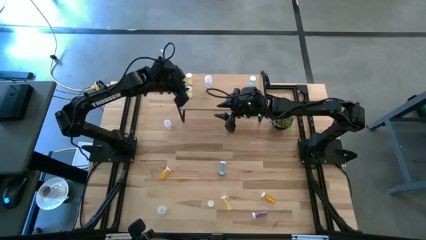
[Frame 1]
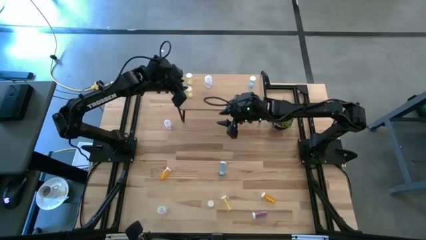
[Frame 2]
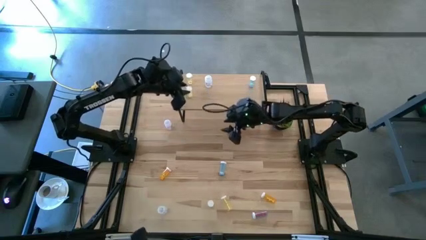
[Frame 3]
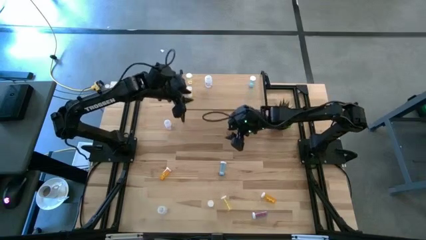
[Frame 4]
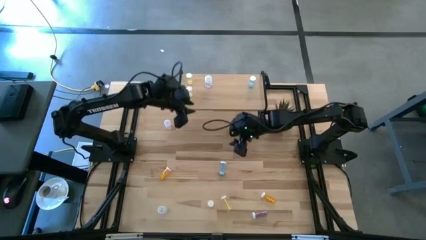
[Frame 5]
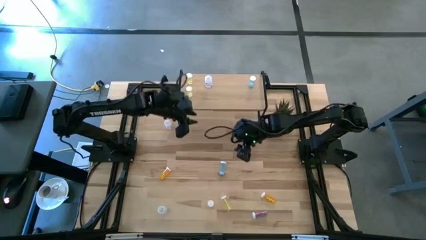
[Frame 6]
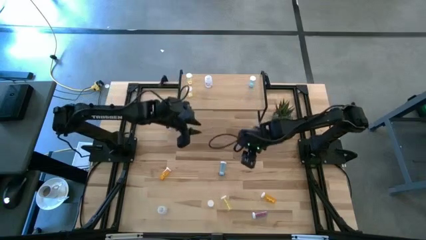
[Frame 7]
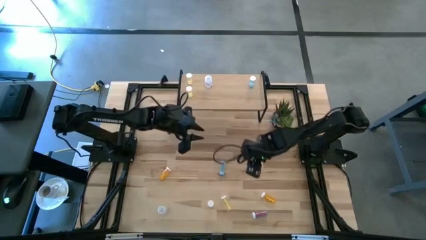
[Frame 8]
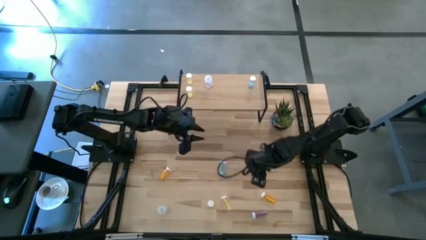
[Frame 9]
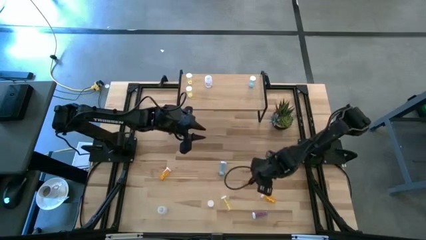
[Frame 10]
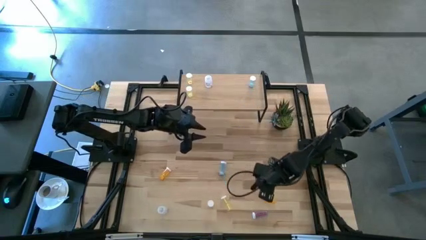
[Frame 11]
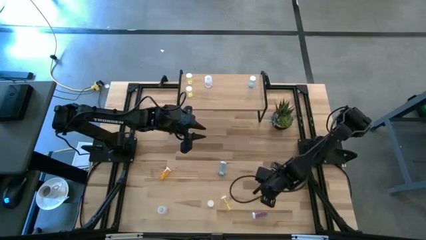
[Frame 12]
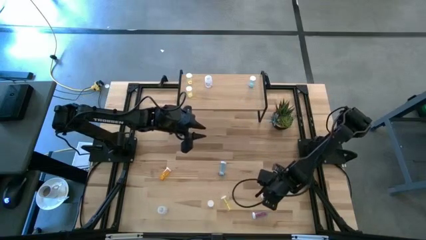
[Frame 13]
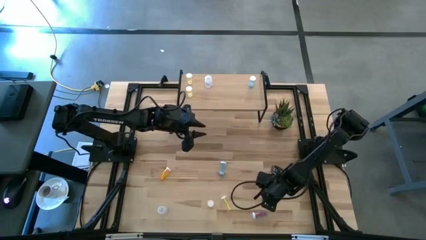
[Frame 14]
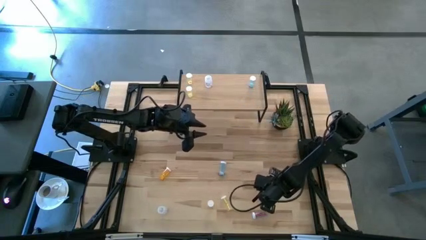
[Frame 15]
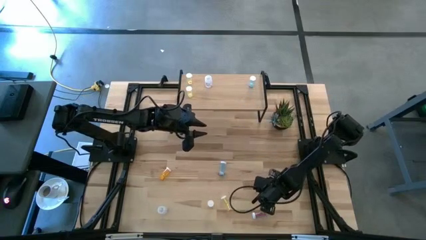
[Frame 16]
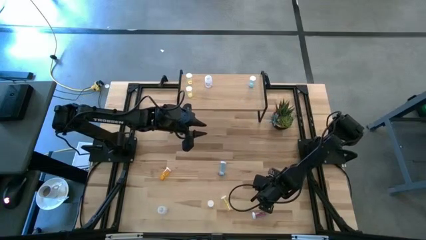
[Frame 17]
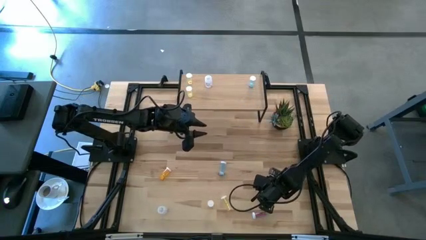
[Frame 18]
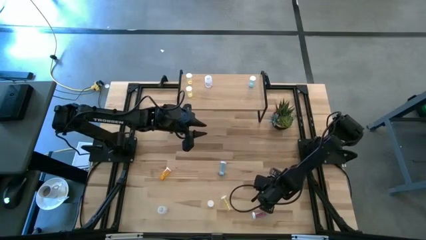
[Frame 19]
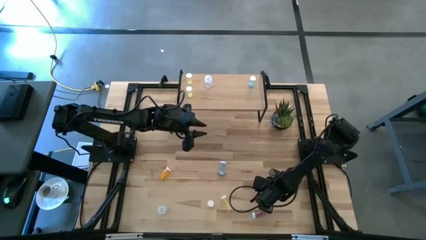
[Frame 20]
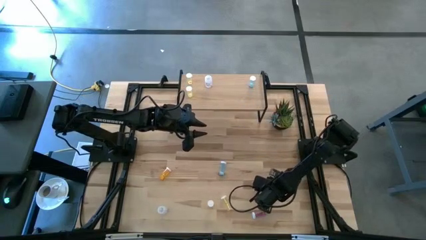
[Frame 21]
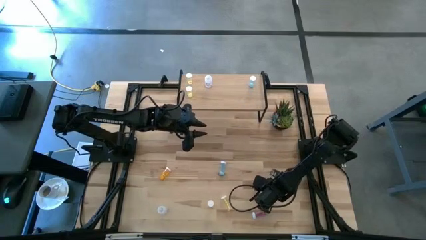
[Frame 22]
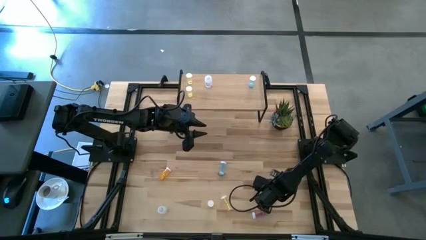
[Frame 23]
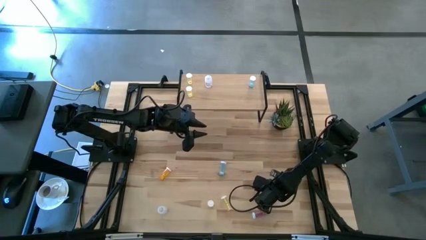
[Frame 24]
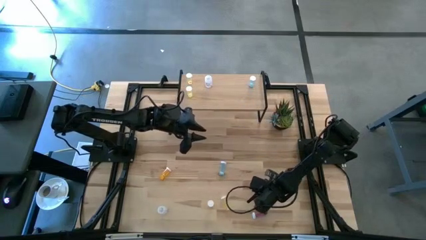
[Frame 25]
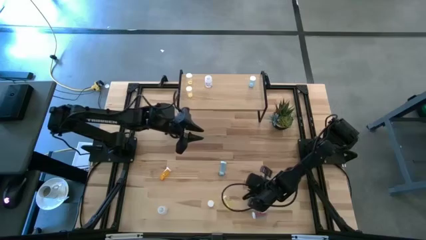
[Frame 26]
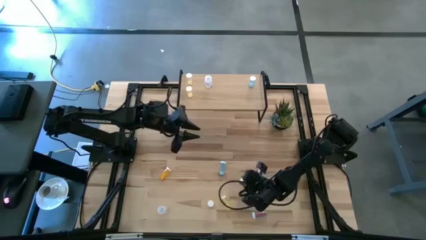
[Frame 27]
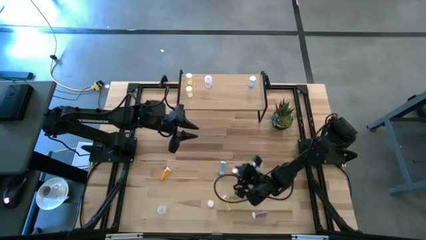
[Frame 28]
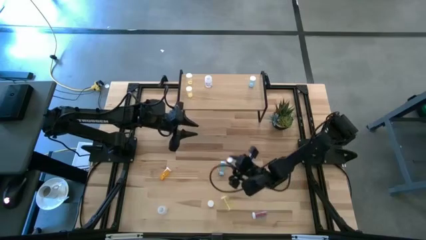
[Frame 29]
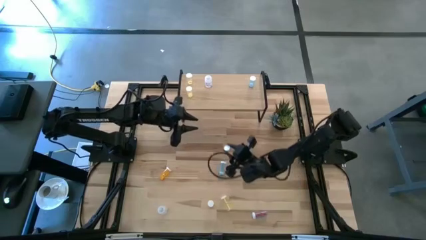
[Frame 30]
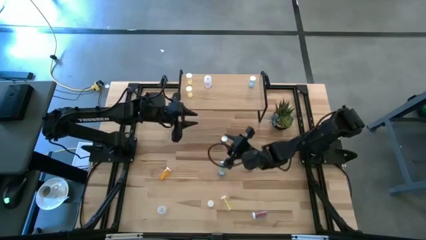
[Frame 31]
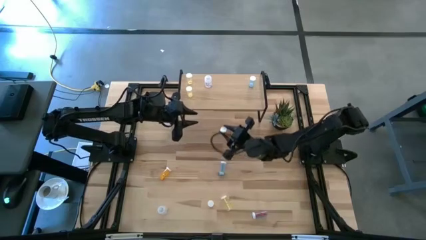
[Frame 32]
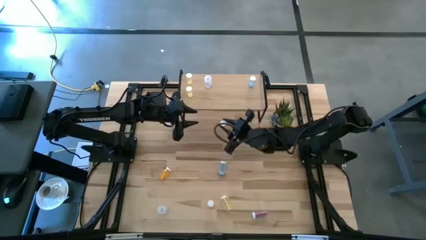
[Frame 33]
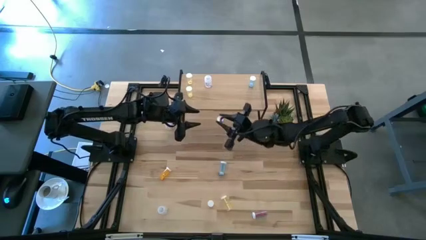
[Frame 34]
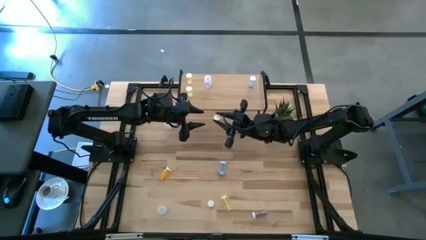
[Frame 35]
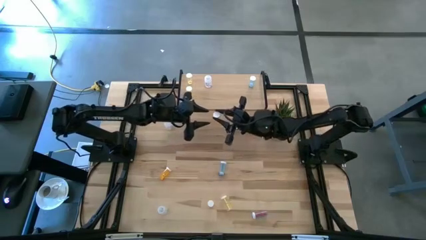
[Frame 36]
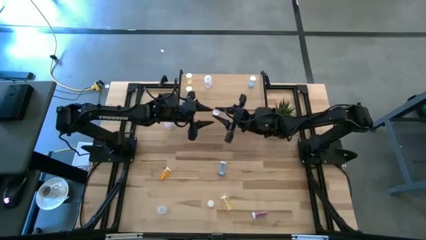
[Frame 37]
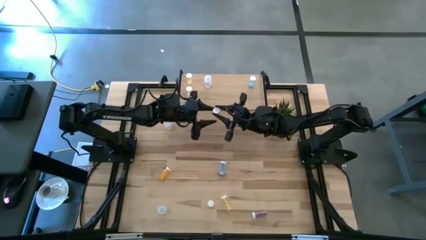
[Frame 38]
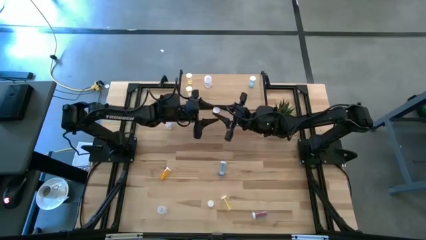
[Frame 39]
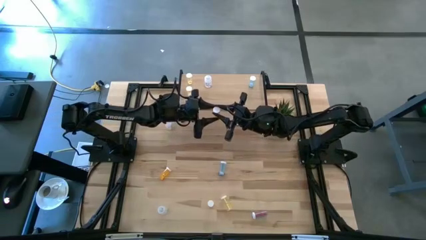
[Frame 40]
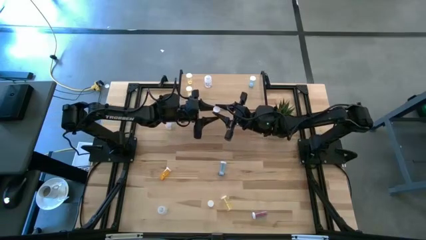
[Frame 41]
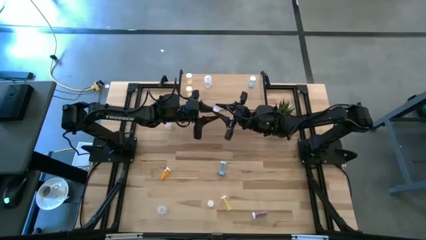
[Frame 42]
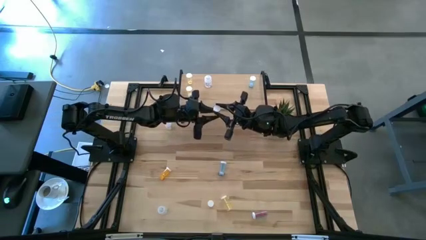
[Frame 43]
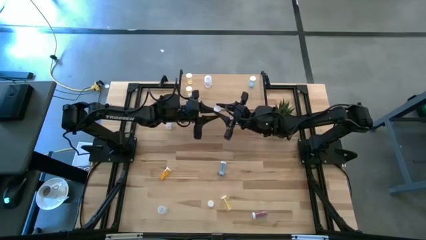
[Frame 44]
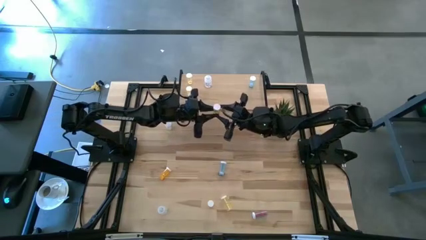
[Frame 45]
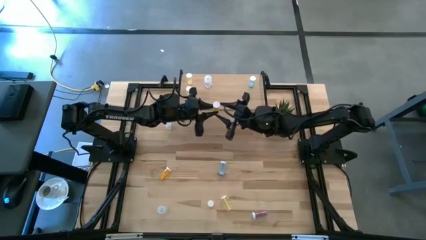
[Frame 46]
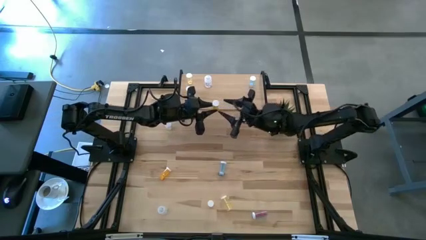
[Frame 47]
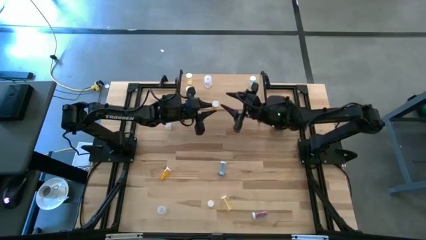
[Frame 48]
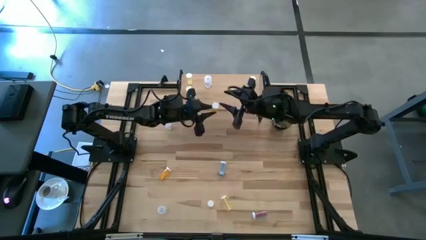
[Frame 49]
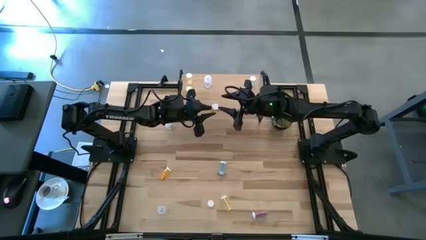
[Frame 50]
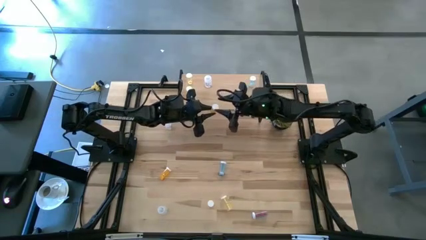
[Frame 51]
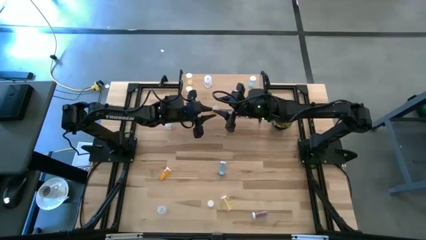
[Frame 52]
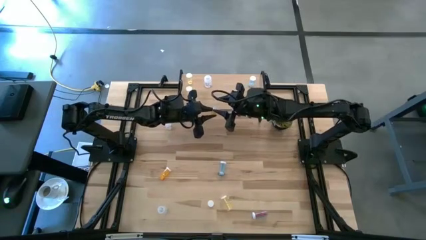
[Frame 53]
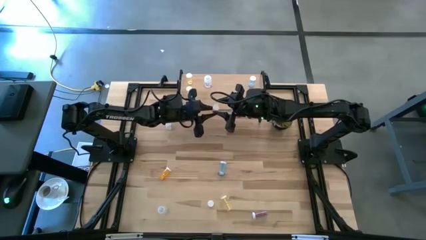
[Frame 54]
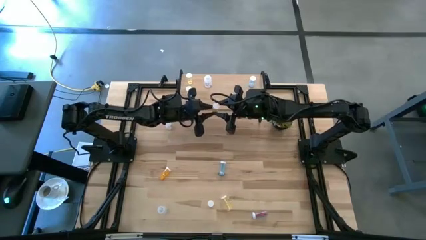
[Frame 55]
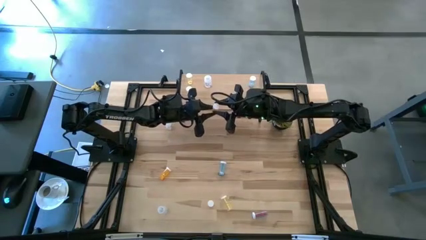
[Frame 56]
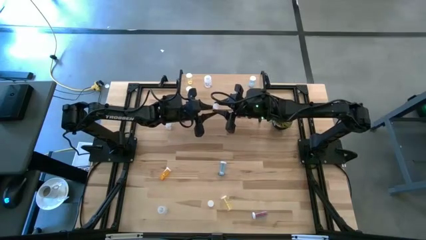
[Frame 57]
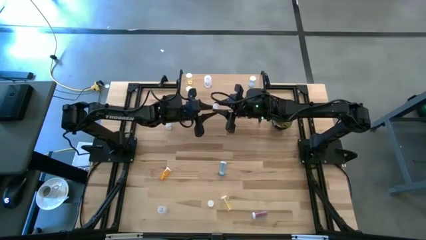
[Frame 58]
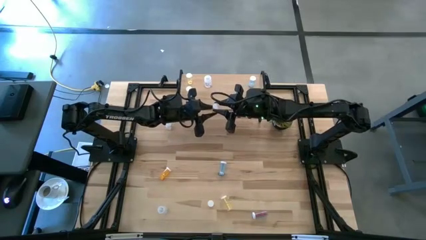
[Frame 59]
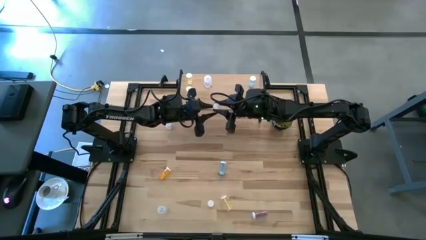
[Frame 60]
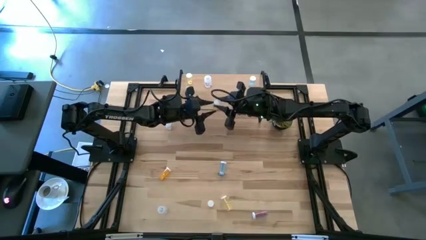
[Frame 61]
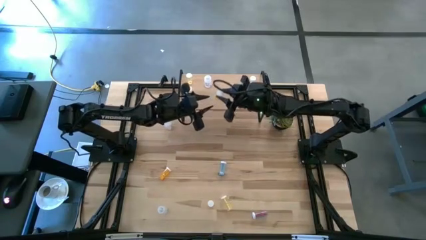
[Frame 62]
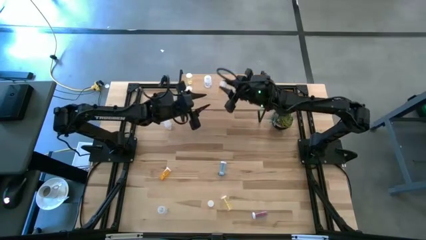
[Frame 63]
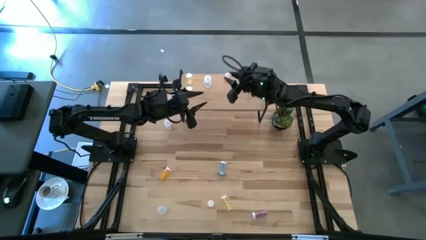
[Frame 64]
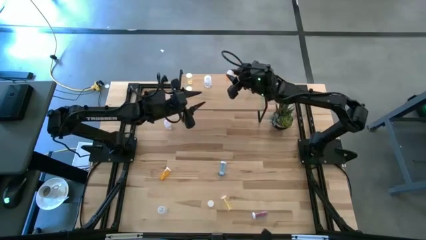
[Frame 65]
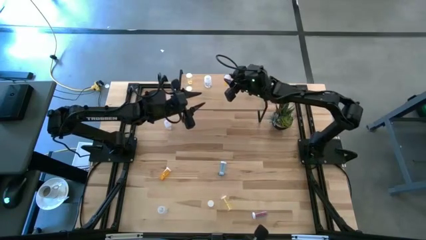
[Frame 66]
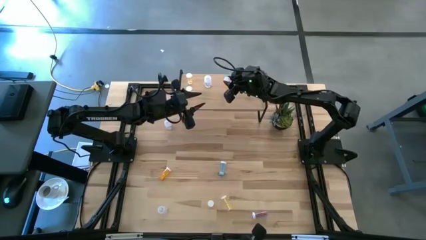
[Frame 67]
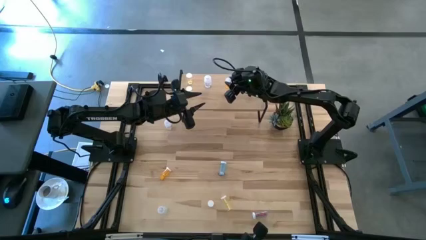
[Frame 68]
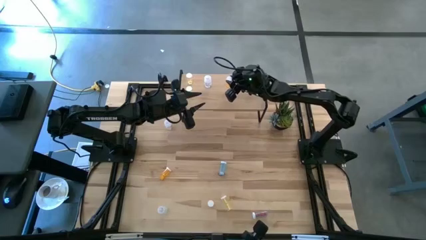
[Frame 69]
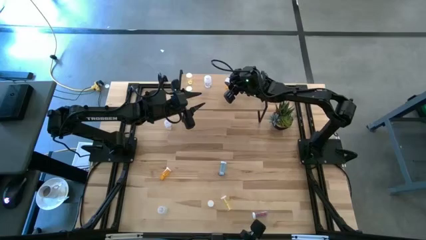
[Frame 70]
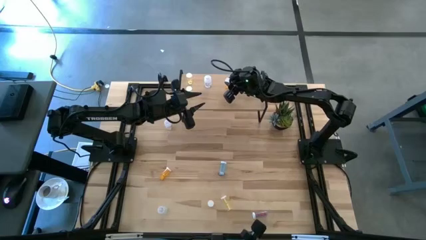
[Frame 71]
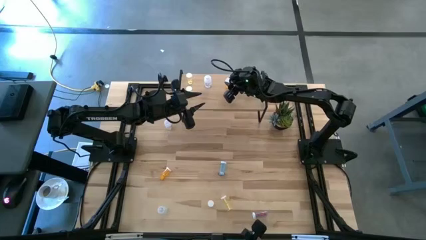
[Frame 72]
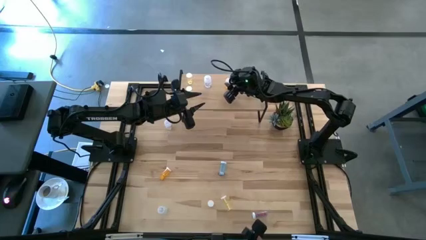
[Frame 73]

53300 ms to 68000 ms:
Task: Pick and place medicine bottles onto shelf by color
Put the bottom right orange pill bottle on the shelf
